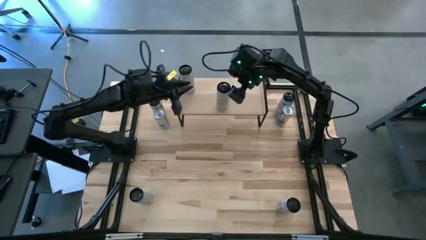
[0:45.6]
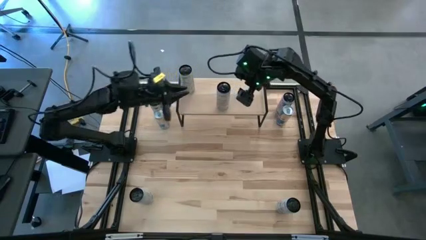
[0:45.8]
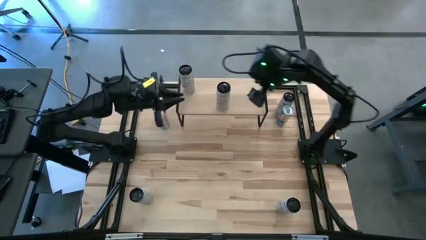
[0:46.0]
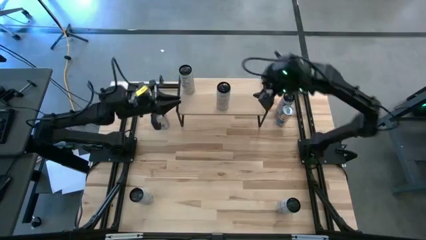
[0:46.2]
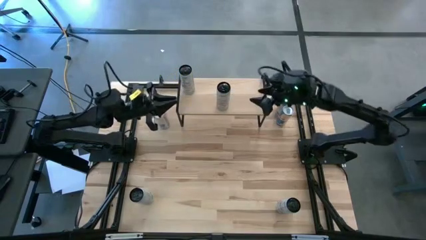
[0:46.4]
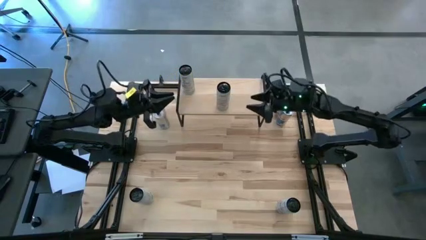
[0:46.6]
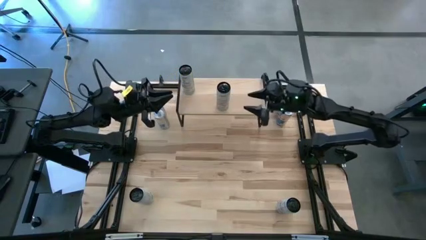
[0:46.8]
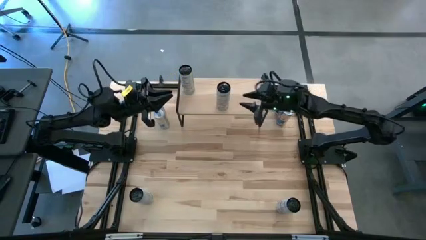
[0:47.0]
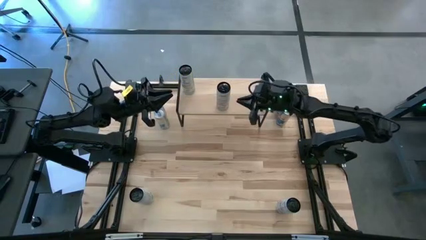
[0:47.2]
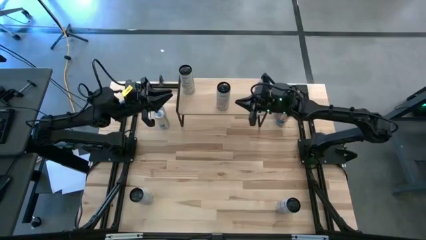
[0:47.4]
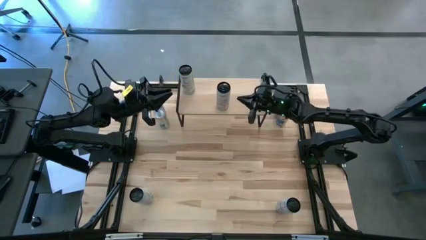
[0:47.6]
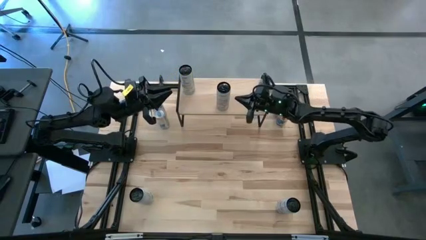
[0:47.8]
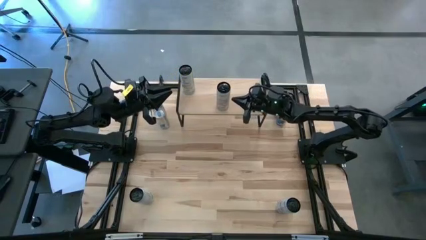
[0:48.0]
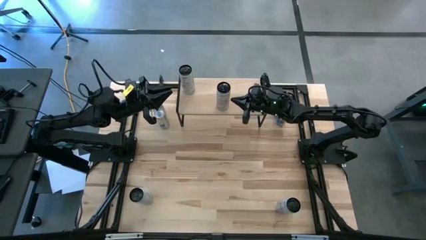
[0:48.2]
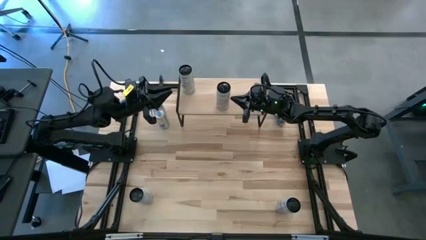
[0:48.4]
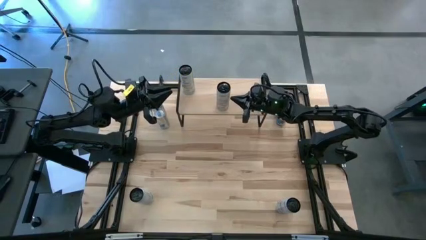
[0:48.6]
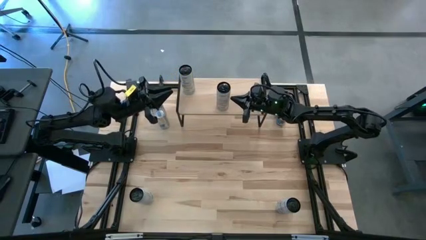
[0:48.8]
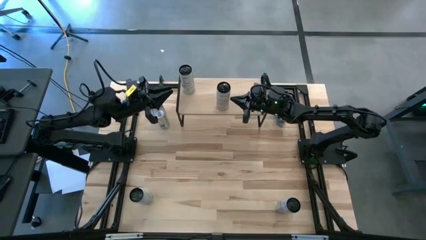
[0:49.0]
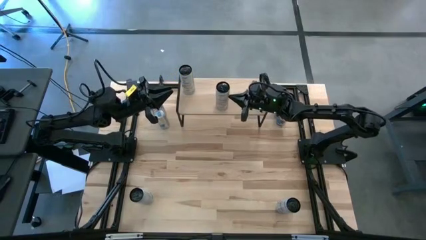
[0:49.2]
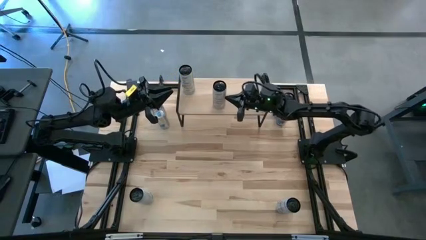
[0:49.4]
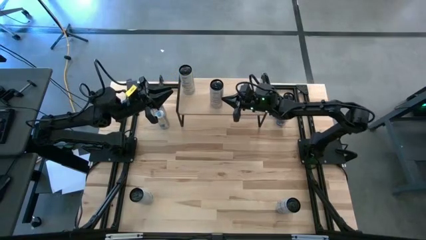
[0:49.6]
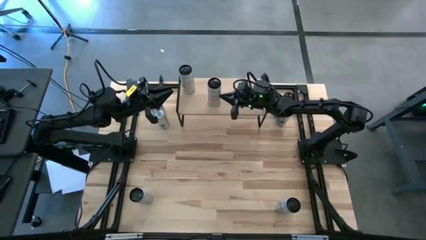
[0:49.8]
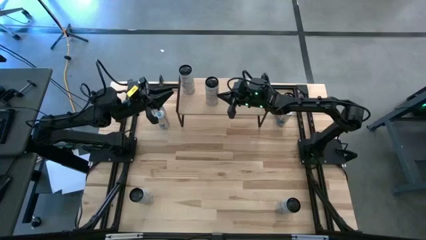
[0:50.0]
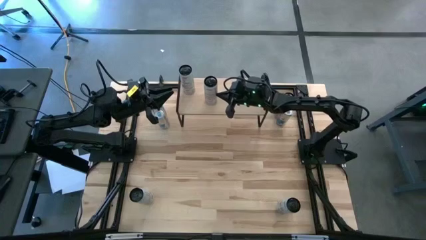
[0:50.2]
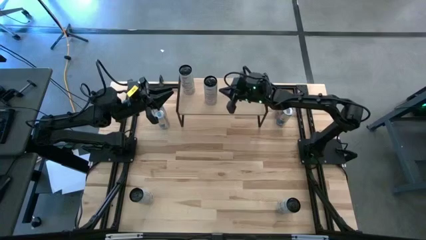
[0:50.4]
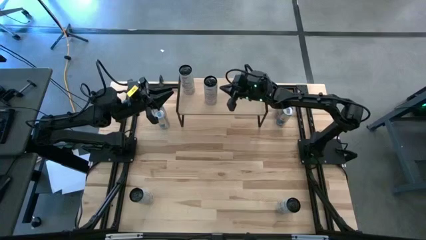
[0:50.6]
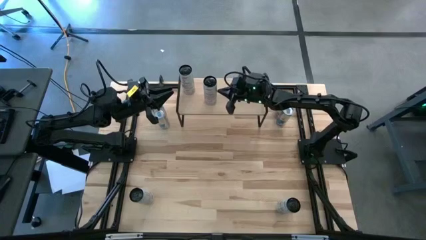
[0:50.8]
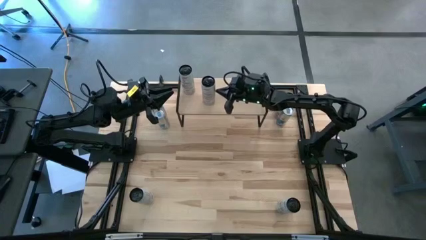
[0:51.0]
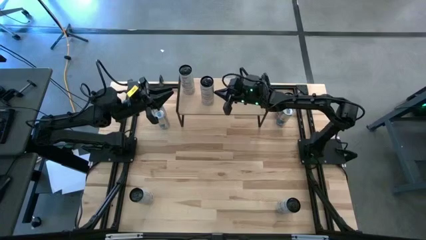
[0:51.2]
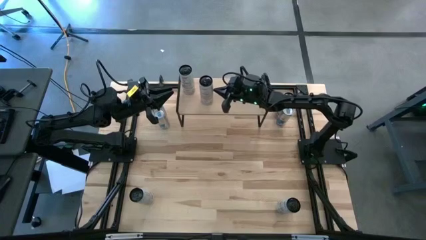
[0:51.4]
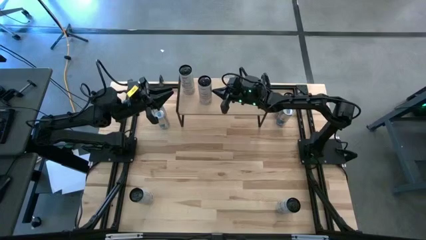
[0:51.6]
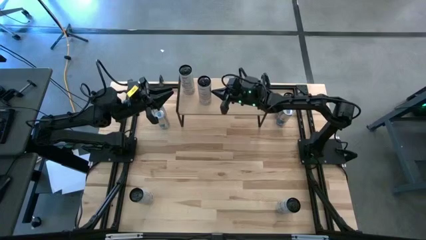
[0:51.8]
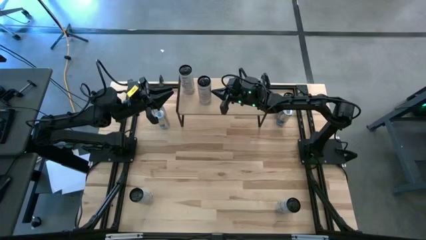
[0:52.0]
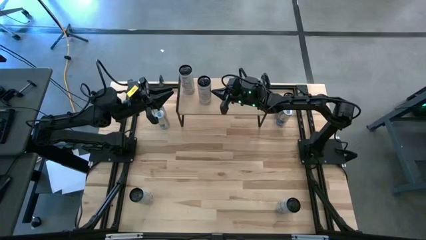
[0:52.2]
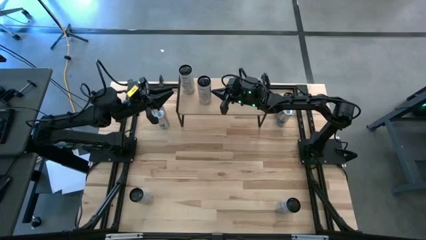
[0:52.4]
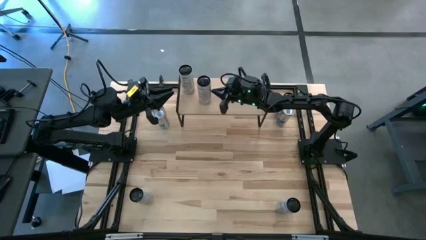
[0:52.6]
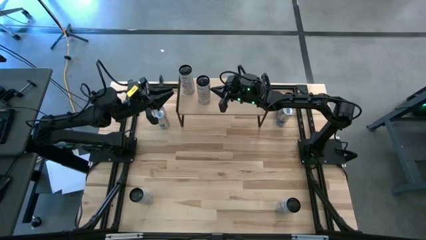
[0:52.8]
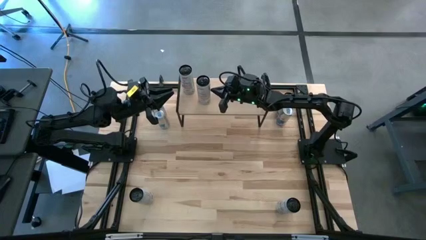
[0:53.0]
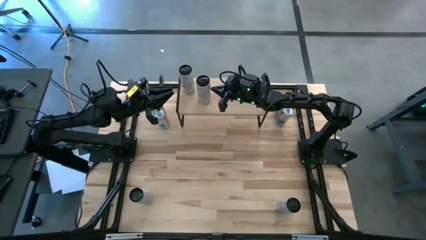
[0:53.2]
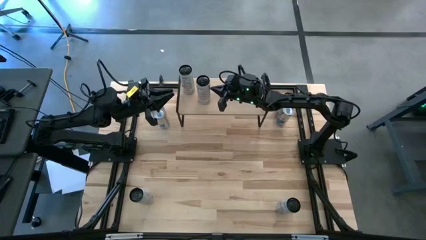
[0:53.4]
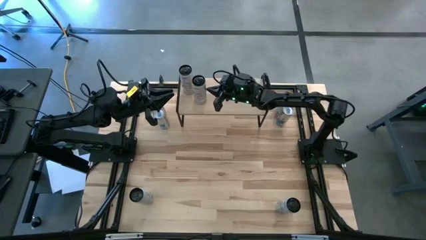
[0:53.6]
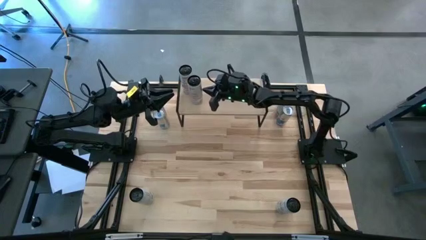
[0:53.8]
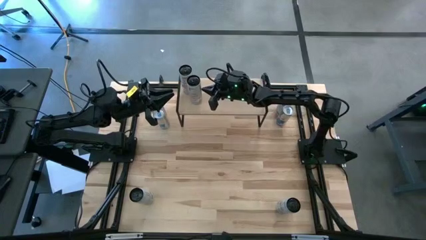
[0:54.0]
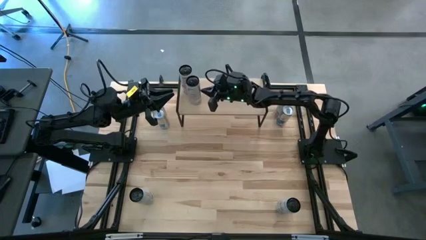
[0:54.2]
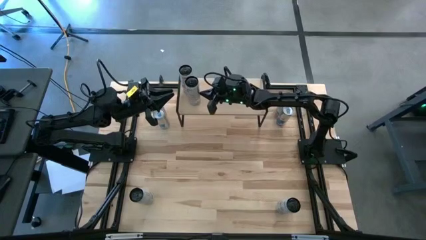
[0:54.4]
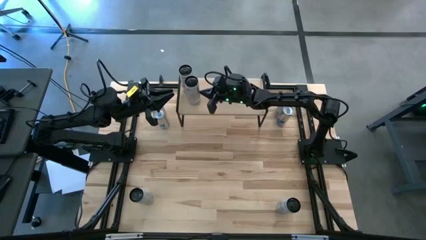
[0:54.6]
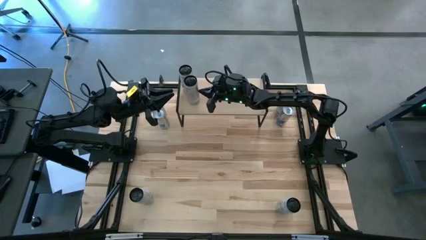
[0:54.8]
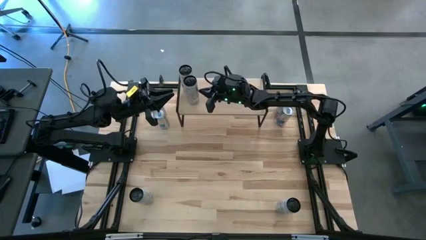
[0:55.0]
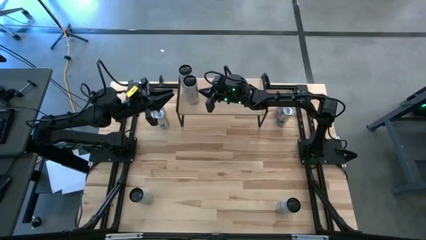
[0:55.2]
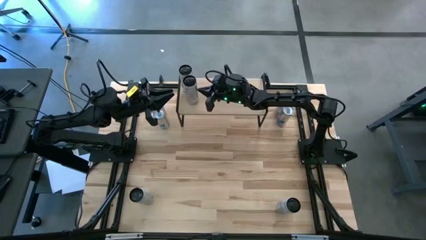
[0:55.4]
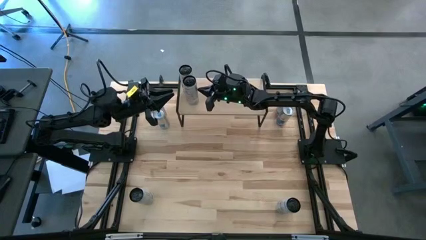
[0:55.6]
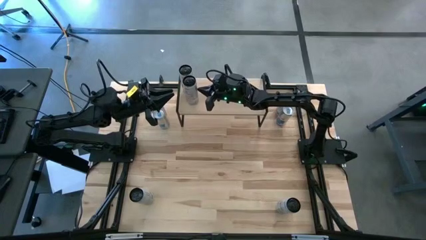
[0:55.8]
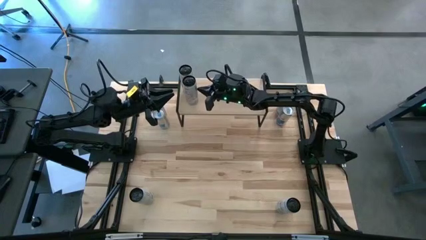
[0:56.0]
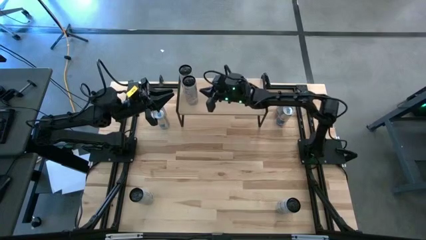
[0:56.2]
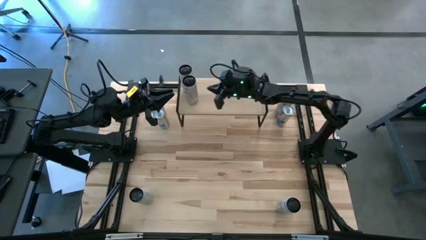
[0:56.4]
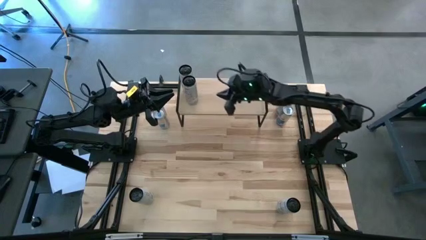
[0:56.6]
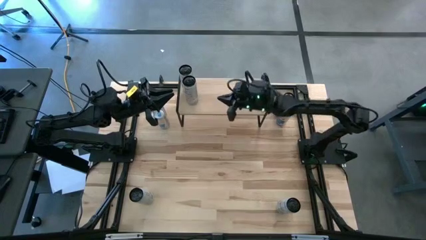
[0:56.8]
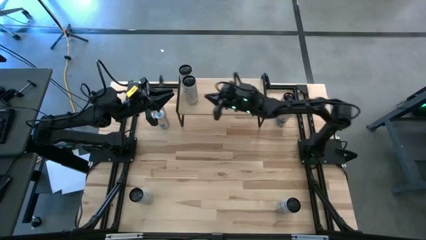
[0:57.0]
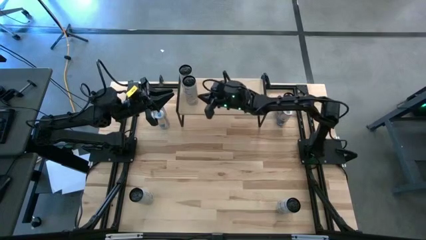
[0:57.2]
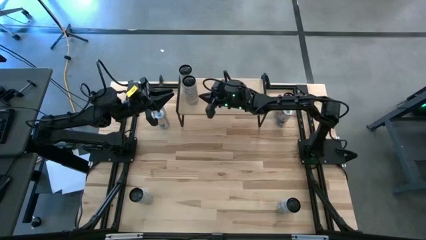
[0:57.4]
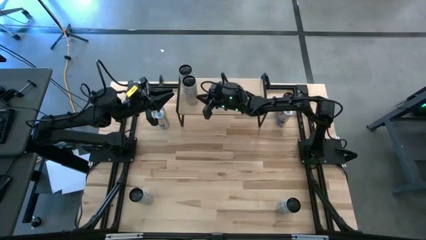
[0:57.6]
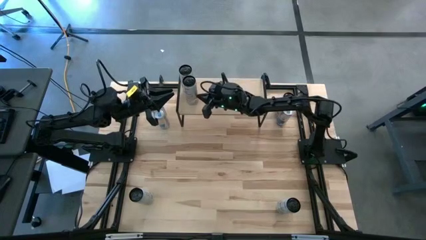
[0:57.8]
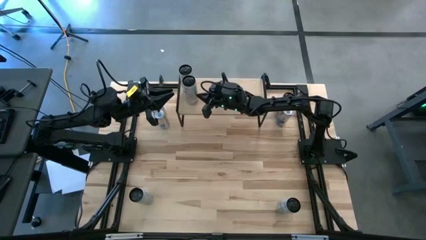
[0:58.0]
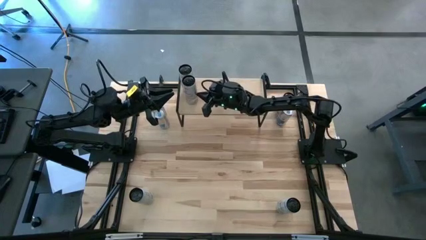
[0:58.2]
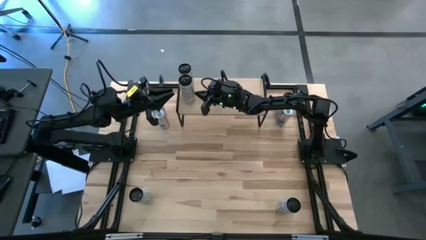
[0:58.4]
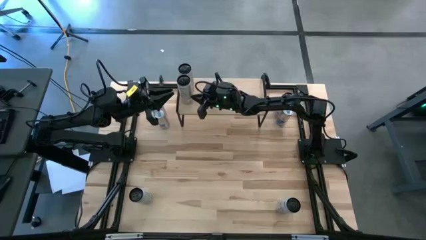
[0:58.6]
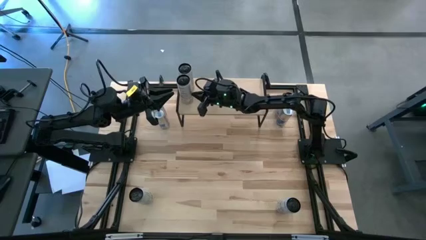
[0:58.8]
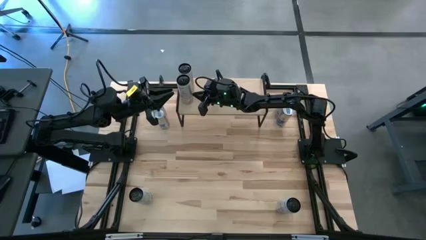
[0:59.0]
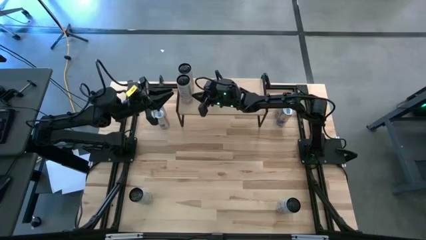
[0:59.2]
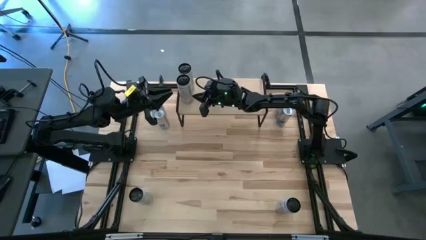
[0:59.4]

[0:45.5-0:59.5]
Task: Place canned beverage on shelf
Put the bottom right black soda can on the shelf
